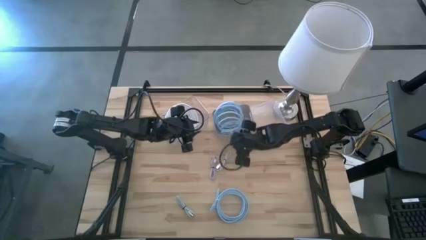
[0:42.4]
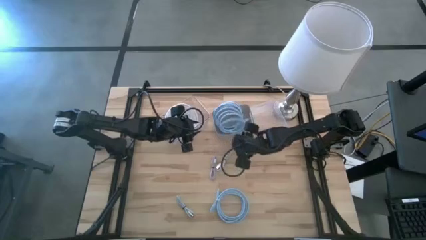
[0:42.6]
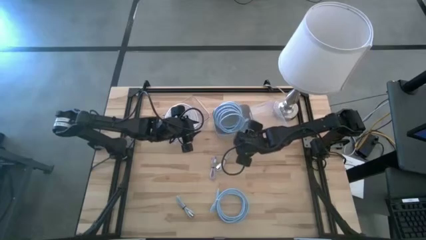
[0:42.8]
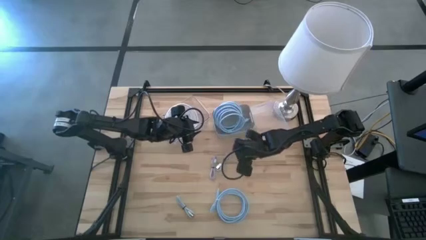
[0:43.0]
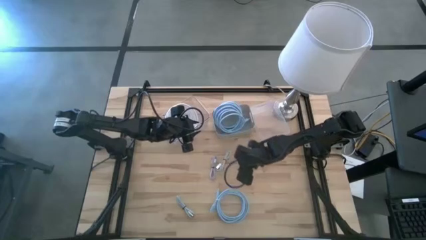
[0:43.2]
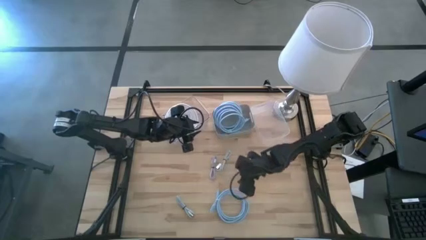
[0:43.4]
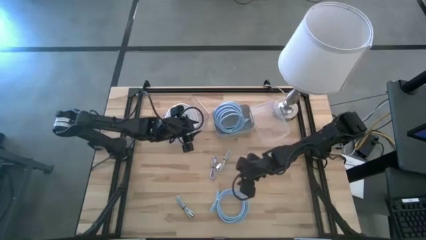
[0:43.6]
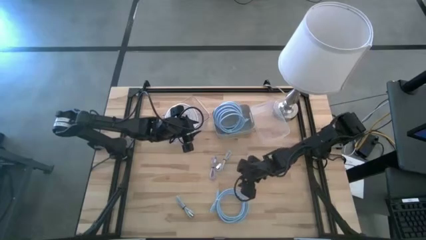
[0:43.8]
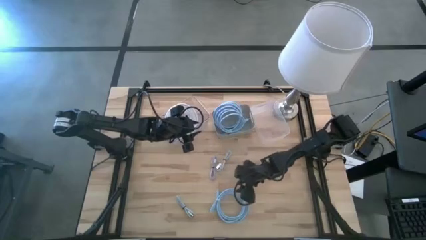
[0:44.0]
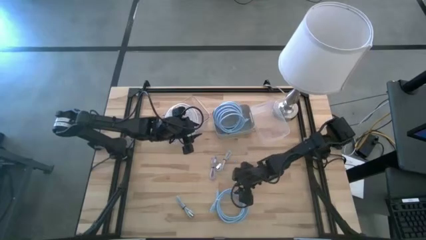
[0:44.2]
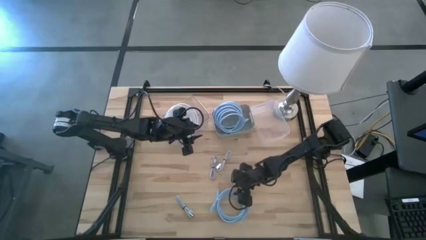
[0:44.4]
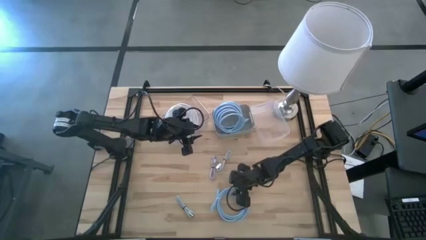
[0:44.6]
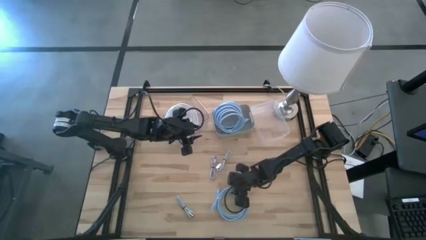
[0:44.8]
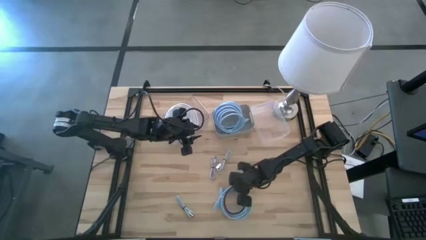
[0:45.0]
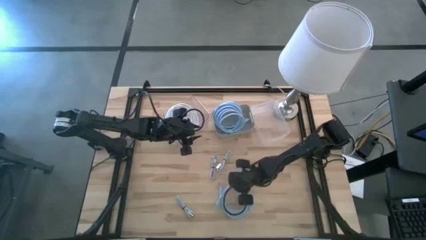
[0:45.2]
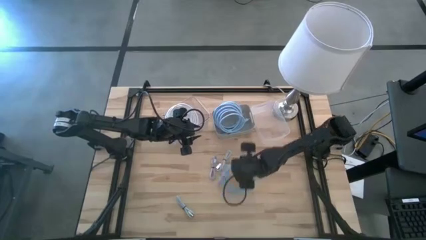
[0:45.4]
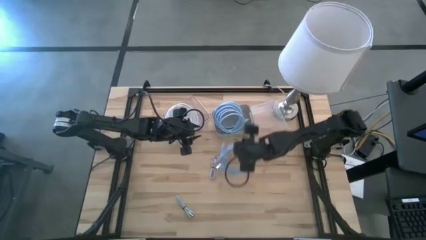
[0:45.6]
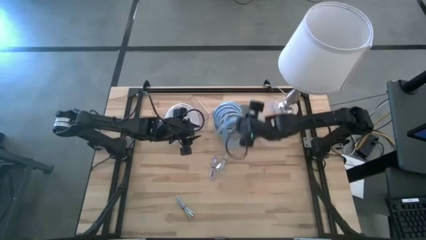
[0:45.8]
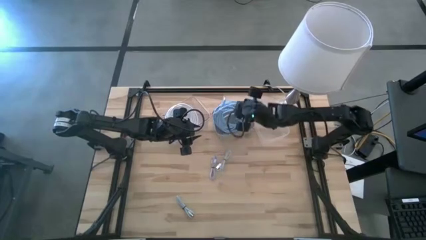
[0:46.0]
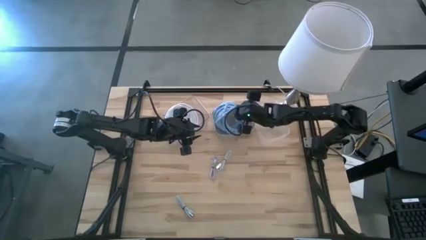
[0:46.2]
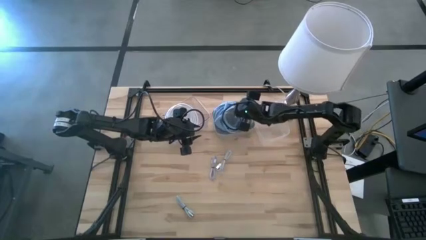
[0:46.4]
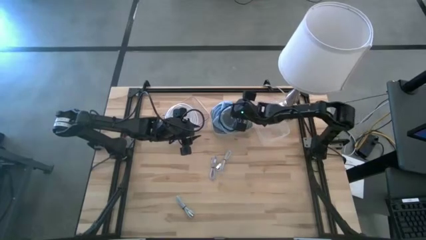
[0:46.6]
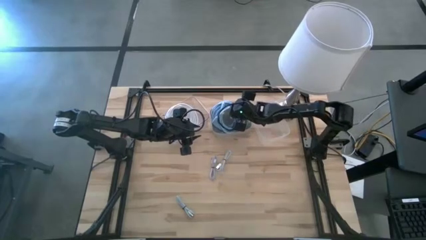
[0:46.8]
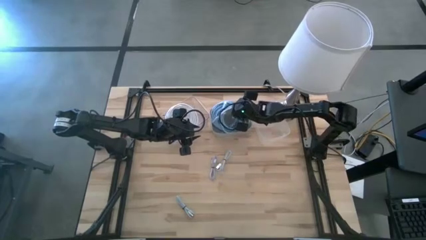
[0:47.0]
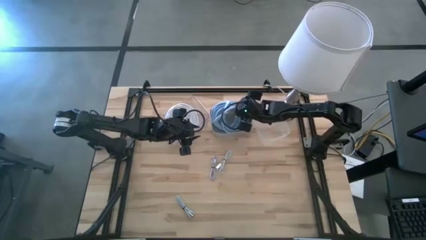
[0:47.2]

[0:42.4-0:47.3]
Task: Pick & Place USB Port
Put the blue HDMI cable into the gray bin

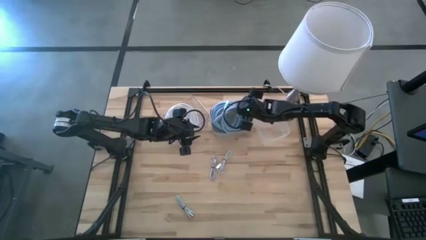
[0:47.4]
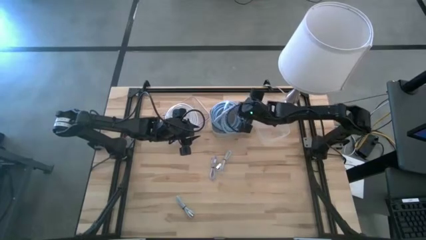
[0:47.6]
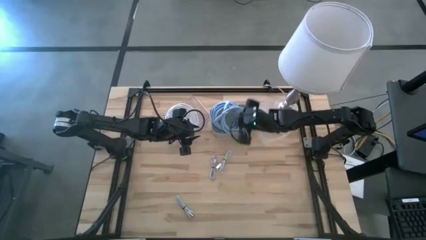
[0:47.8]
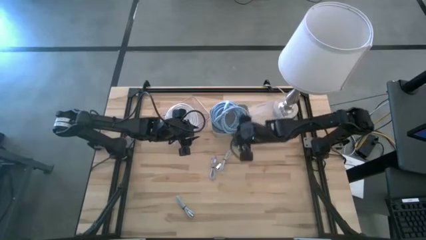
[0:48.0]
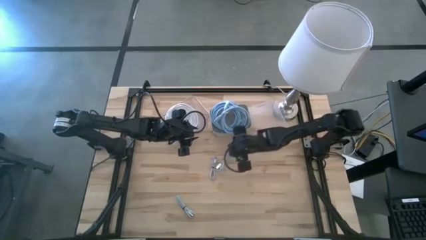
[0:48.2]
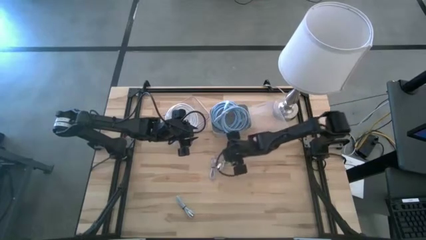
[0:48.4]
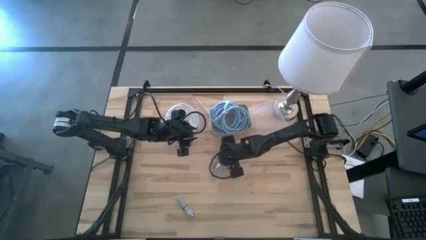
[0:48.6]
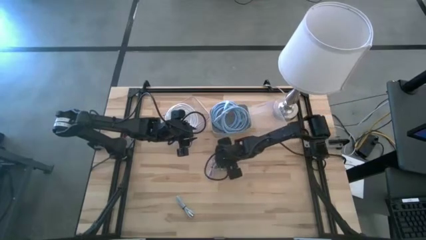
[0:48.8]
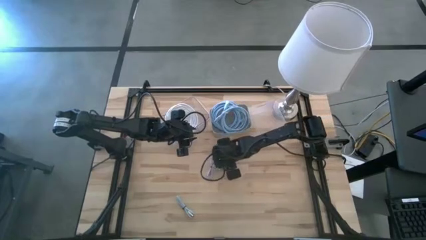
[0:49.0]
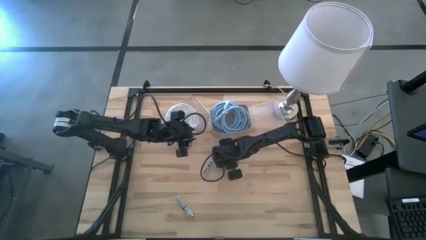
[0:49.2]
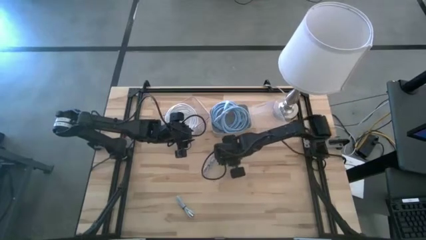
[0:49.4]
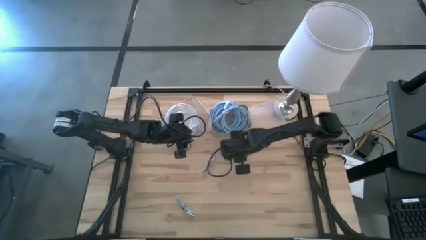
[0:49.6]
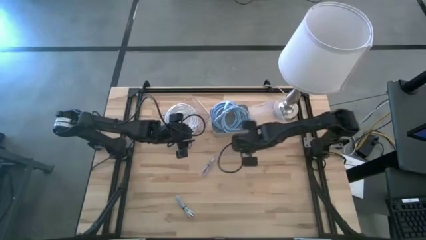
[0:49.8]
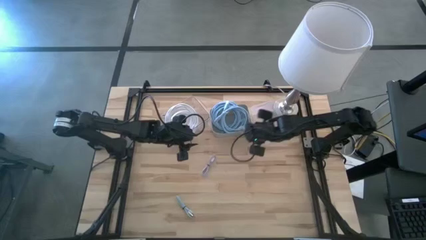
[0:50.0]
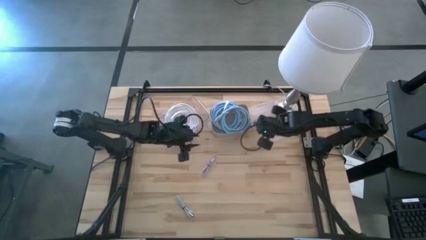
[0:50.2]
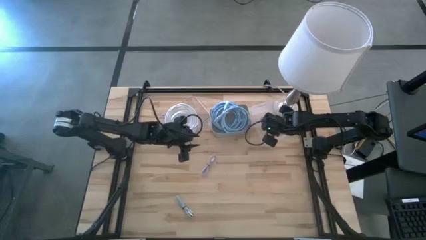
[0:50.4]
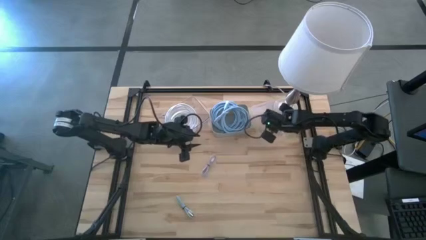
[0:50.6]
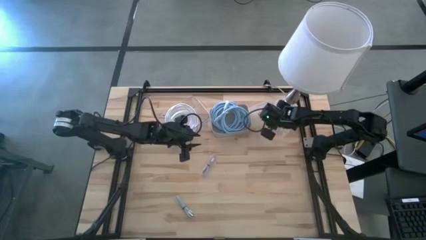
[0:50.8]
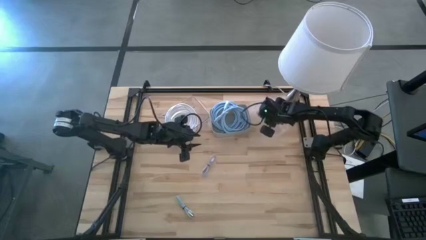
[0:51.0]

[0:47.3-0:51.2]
Put the top white charger cable into the right transparent bin

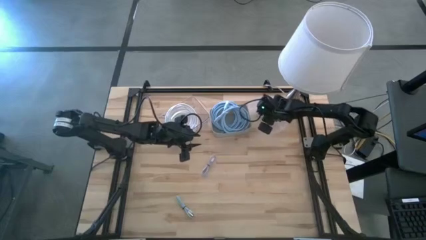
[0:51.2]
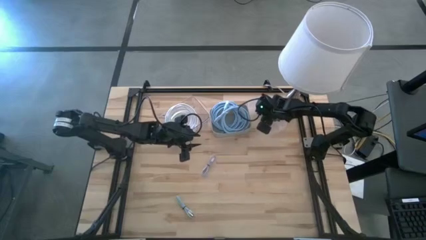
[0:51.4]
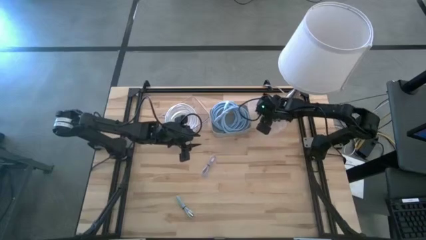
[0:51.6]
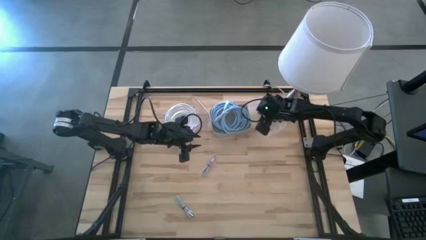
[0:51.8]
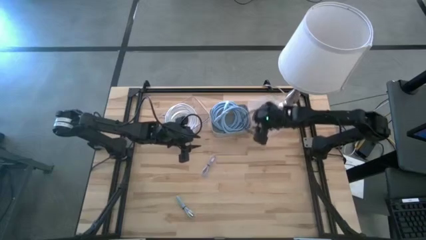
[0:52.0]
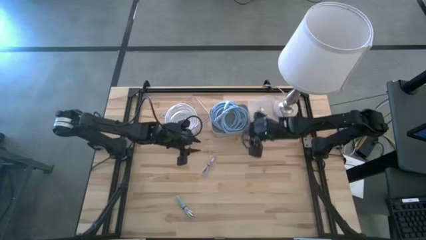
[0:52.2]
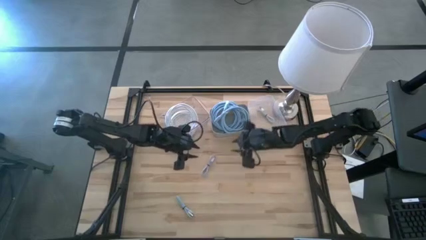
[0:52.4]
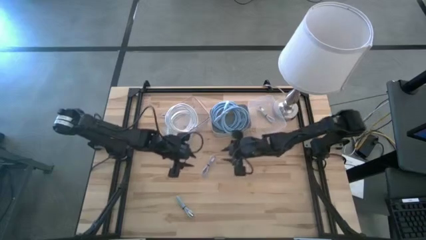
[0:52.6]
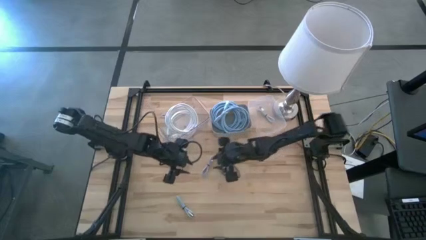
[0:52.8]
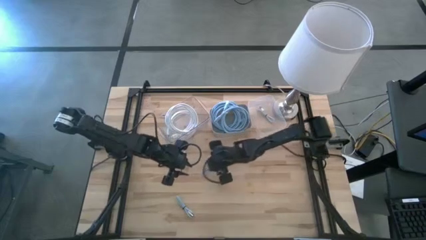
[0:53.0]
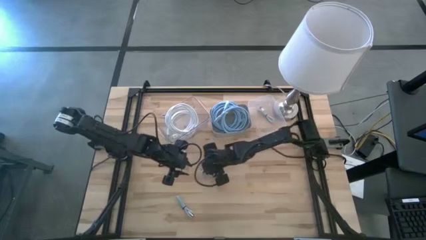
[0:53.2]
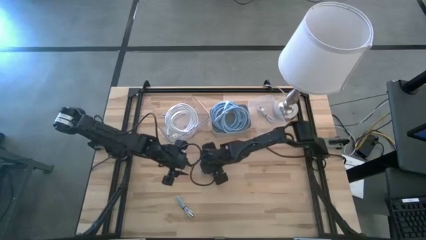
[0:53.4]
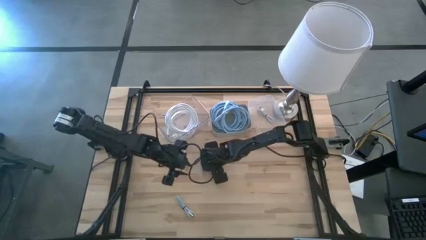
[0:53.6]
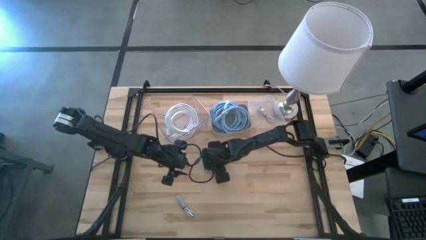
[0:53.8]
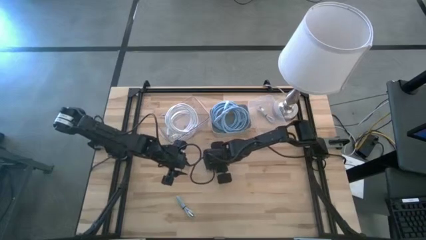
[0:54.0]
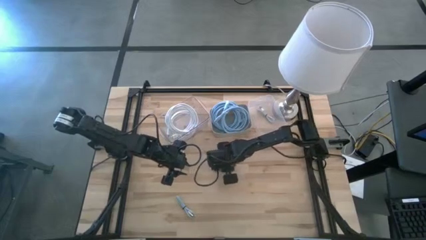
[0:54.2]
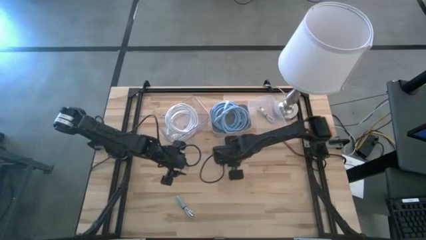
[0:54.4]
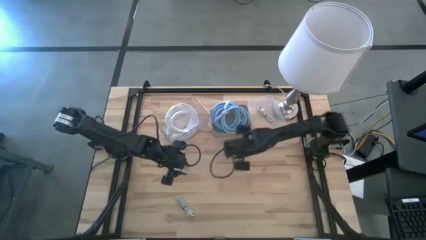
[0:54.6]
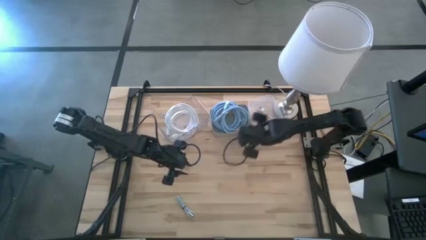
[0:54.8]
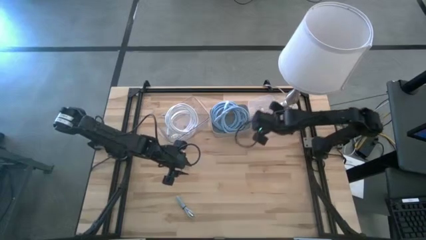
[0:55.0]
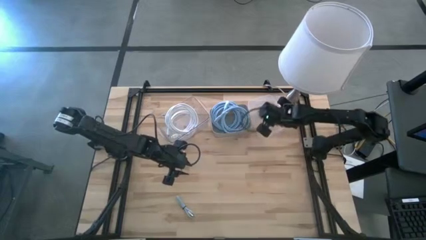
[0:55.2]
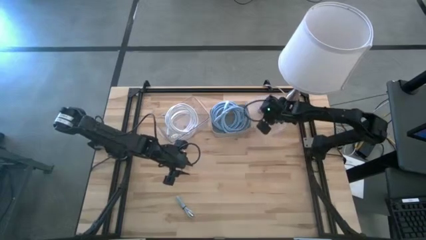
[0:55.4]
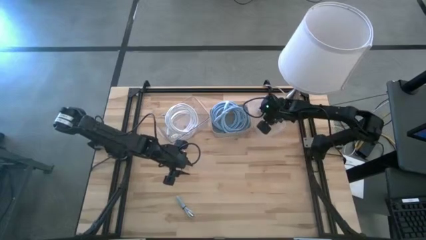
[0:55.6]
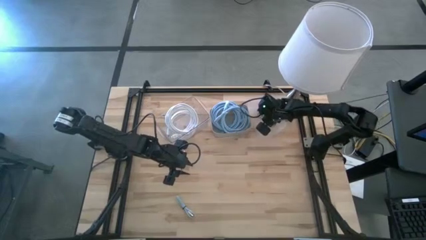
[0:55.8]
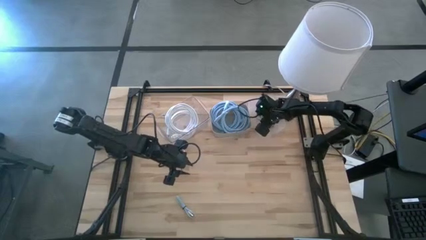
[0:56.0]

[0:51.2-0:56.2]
Put the gray charger cable into the right transparent bin

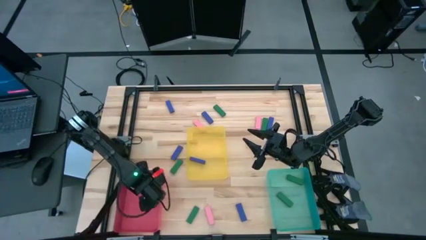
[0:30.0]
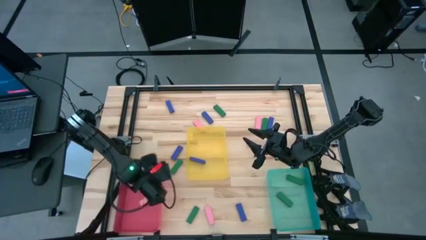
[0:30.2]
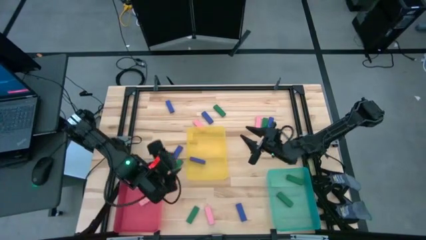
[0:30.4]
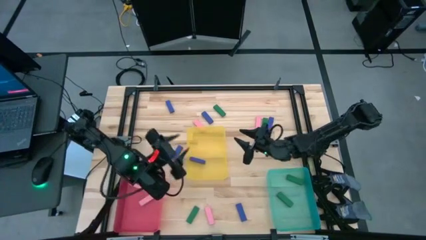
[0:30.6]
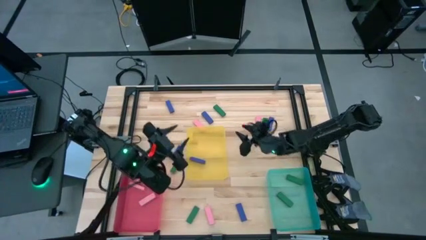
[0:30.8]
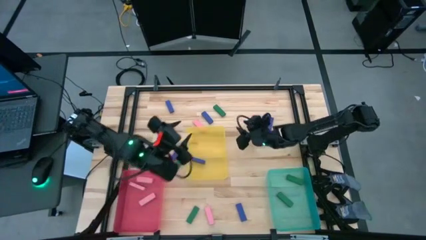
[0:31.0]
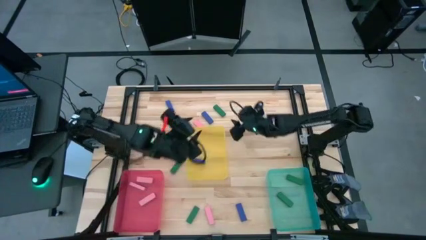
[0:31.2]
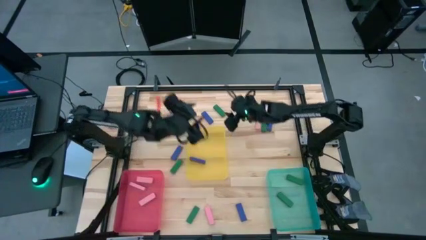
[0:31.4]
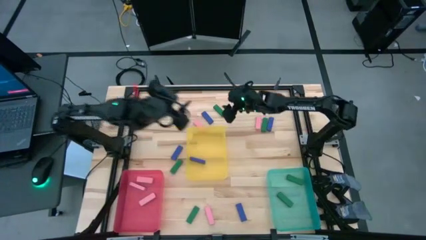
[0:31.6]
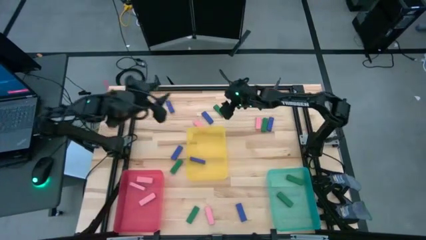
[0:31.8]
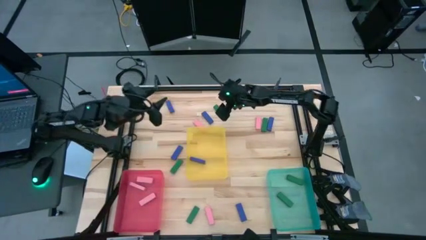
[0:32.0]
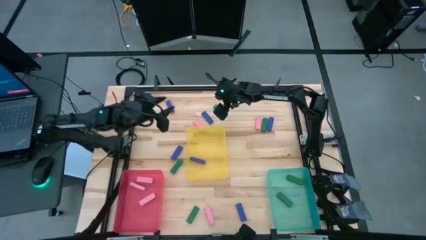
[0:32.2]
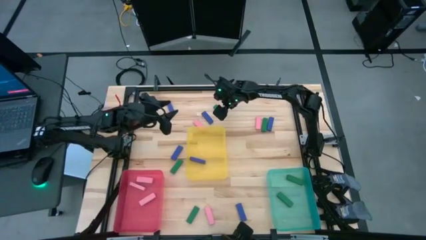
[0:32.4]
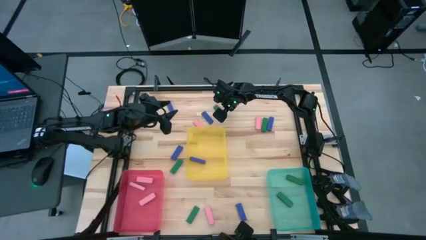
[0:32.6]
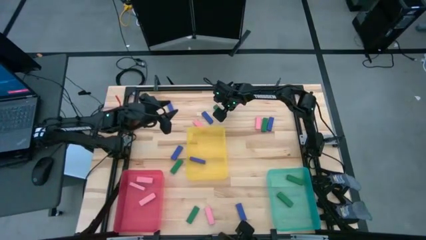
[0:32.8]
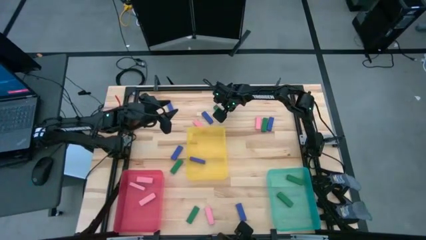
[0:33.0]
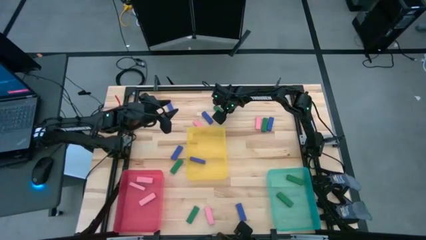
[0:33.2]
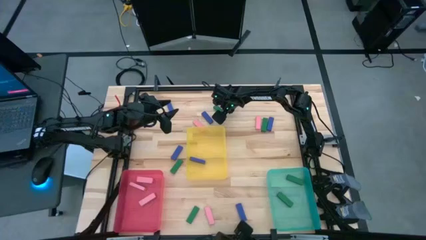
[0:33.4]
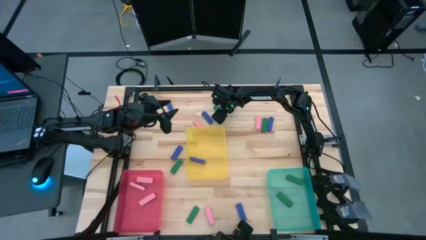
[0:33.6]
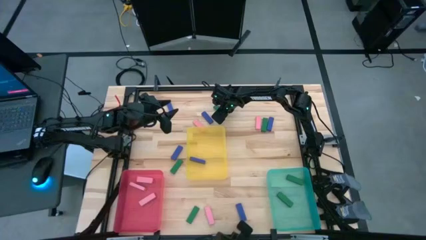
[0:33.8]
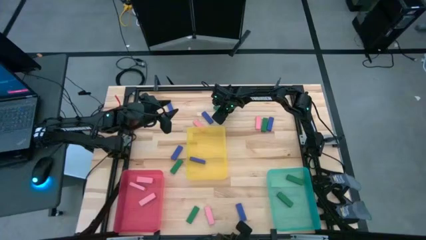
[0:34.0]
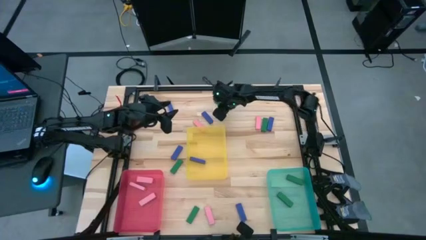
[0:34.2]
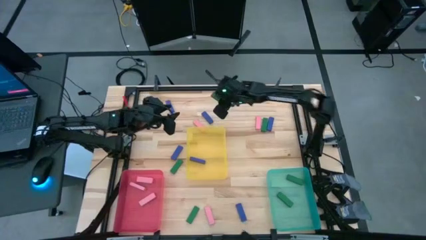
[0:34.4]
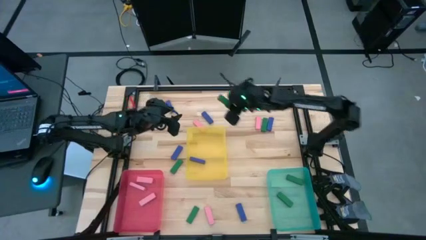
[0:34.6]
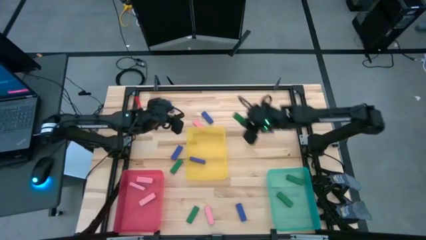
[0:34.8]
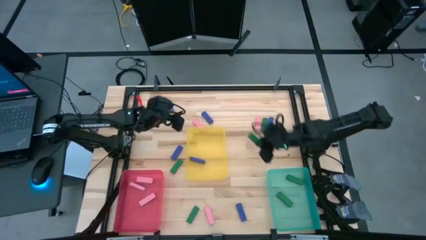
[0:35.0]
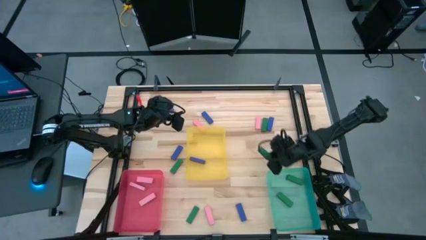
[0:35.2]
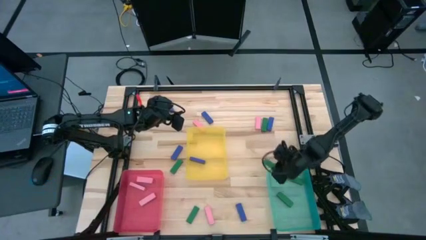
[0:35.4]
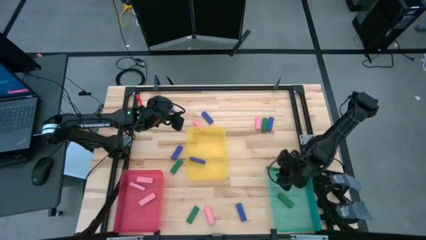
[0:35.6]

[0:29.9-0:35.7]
Task: Sort blocks
Put the green block into the blue bin
